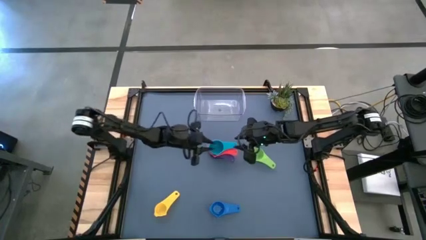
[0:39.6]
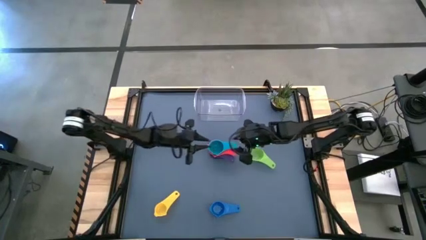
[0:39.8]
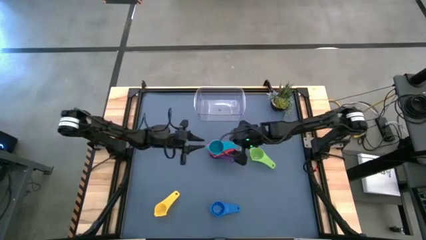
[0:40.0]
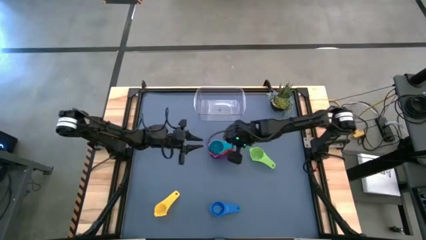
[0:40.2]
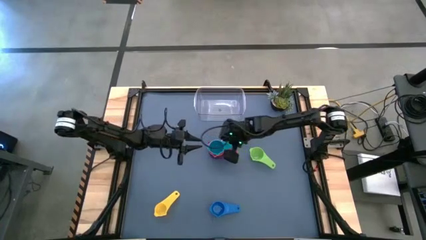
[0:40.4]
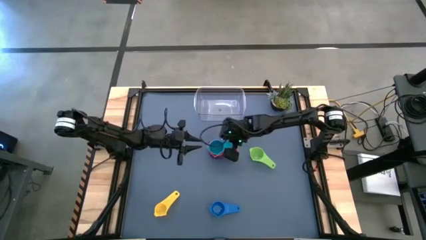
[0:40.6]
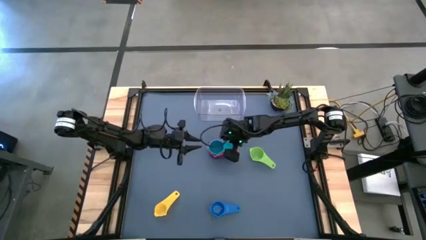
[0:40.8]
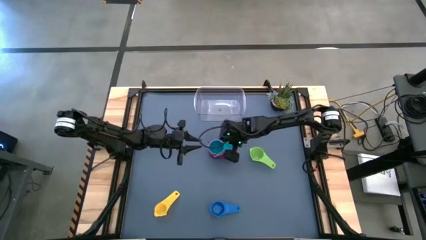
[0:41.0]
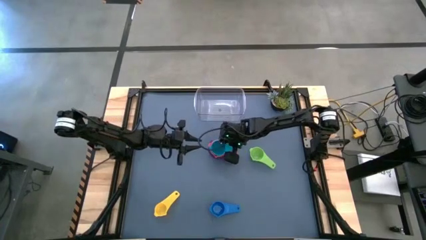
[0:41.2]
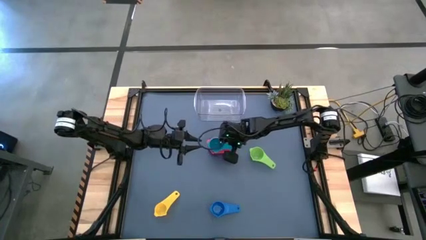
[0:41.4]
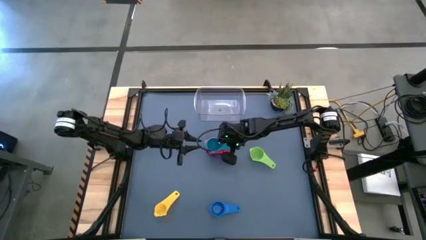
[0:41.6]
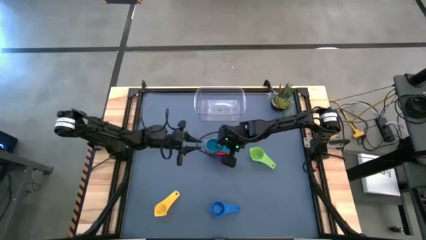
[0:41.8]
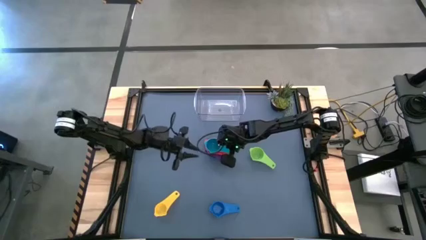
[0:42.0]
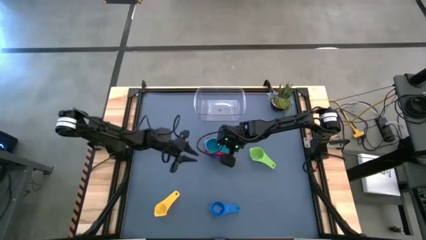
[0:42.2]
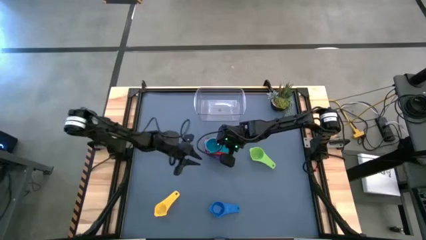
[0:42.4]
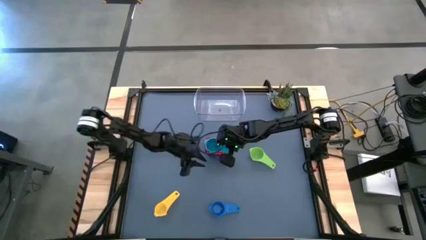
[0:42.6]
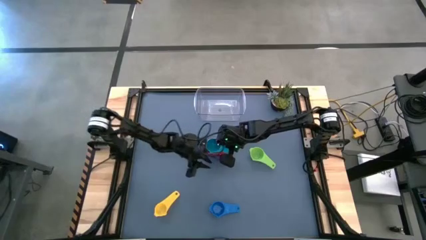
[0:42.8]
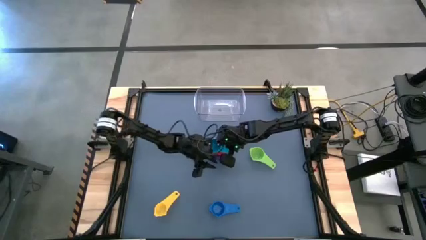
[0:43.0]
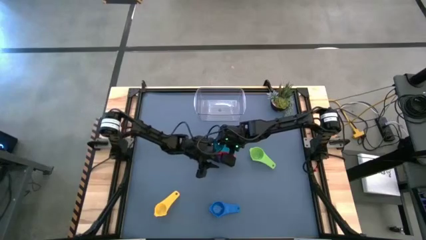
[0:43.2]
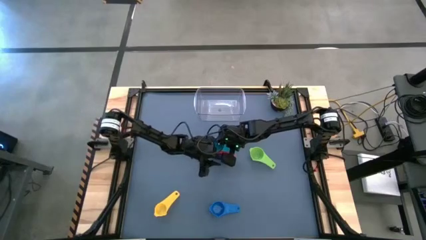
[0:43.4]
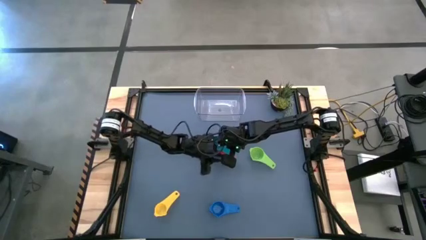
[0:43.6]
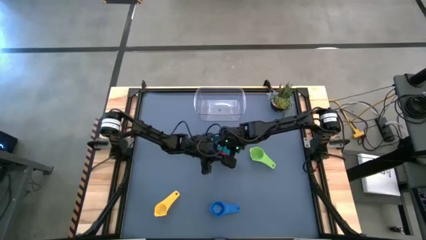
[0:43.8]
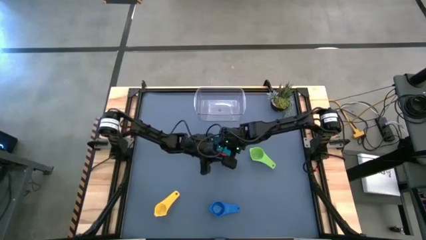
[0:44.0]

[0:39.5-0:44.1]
Task: Nest measuring cups in basket
Adjust the stacked measuring cups

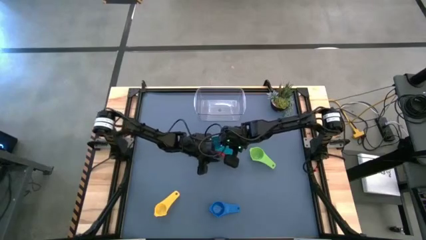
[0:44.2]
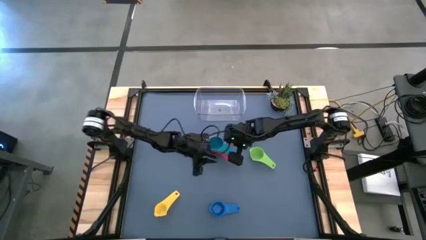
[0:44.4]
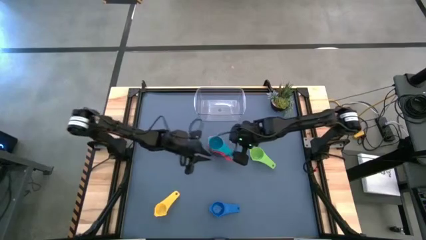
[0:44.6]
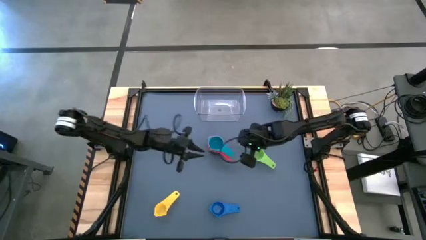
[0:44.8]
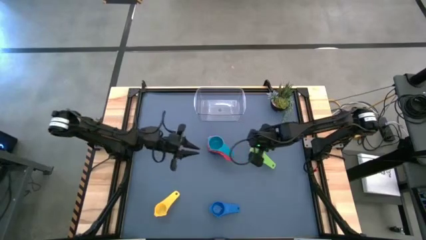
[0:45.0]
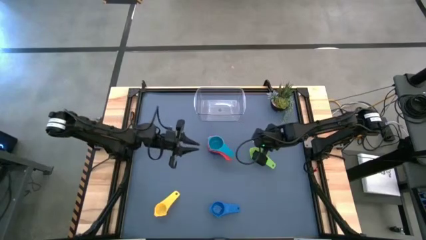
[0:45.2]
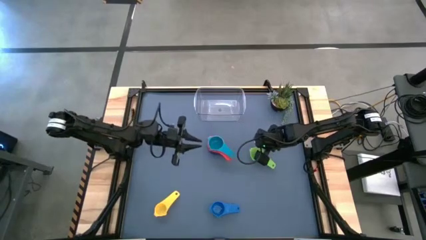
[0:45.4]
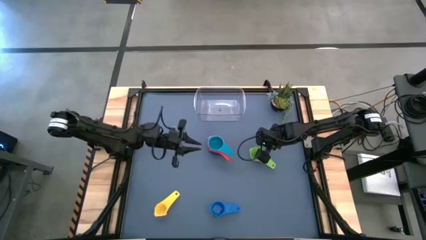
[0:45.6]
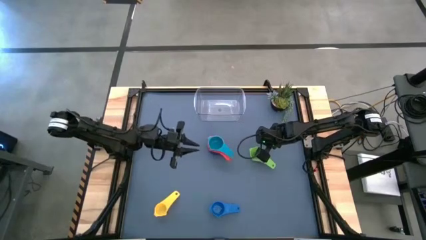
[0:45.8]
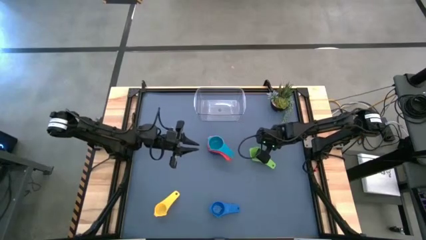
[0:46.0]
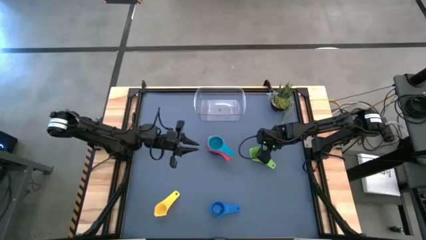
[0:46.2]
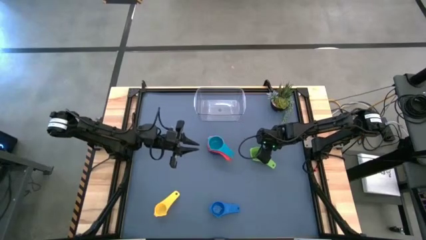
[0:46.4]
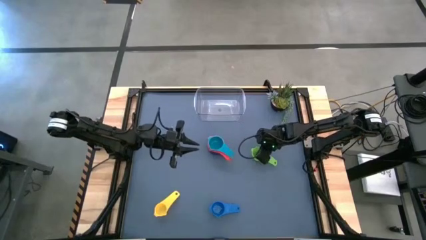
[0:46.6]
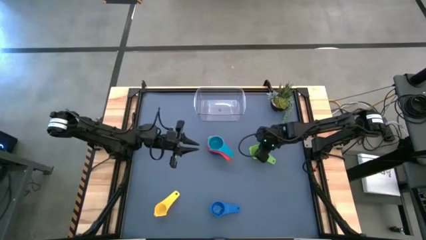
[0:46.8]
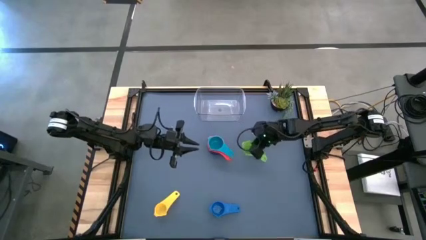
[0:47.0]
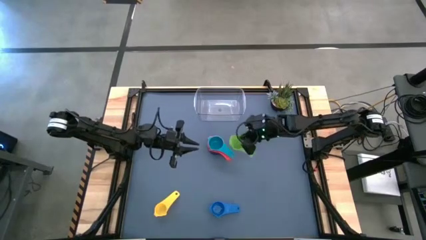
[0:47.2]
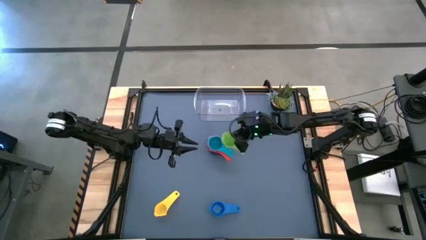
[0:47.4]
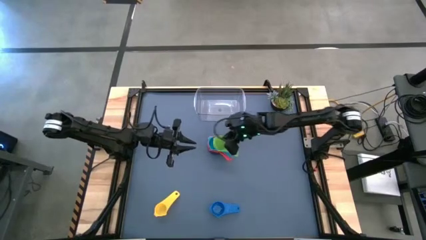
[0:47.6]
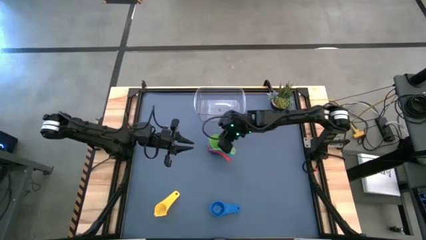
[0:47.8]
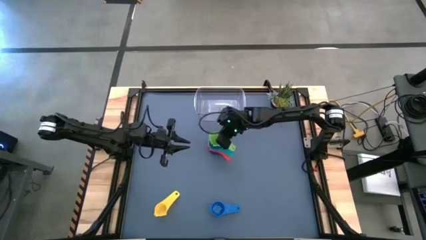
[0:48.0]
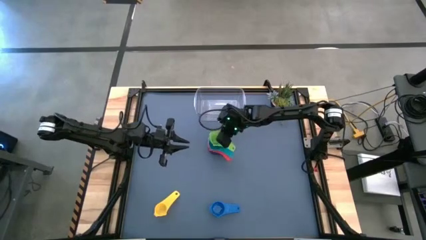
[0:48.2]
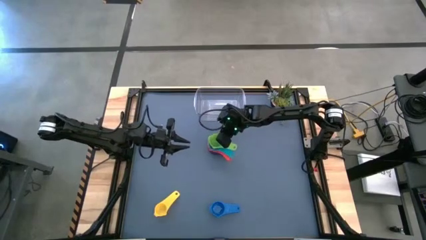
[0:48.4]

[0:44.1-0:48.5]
Stack the green measuring cup on top of the blue measuring cup

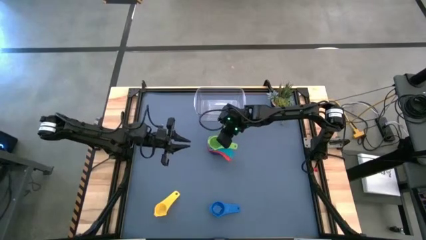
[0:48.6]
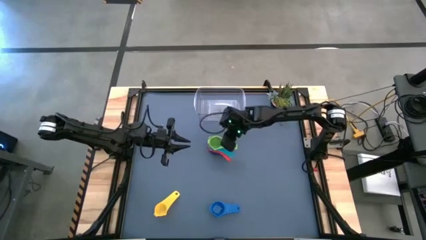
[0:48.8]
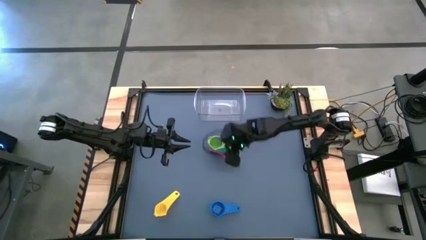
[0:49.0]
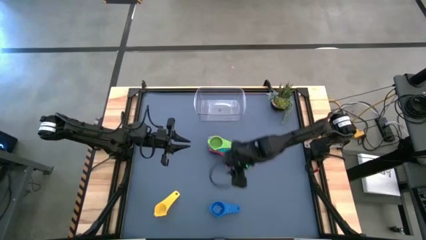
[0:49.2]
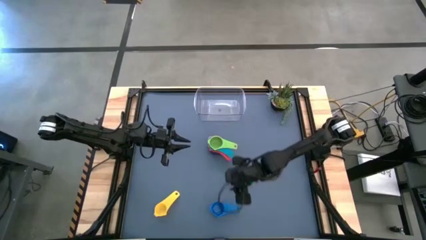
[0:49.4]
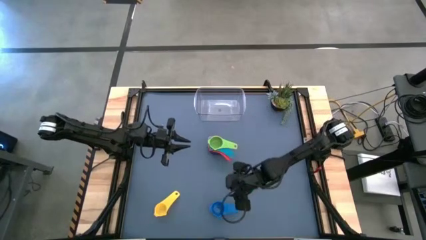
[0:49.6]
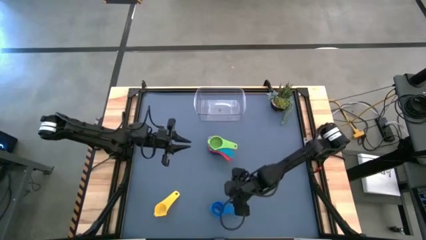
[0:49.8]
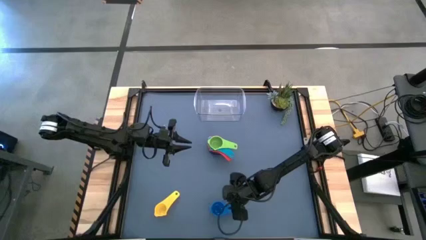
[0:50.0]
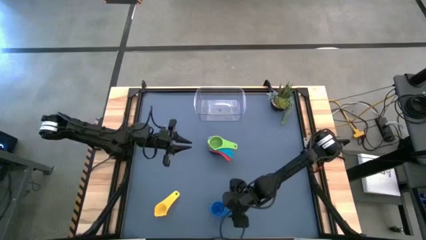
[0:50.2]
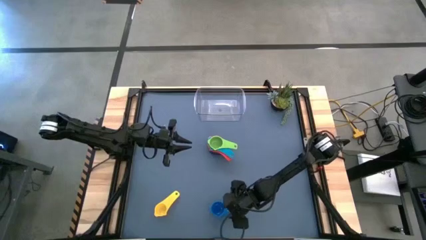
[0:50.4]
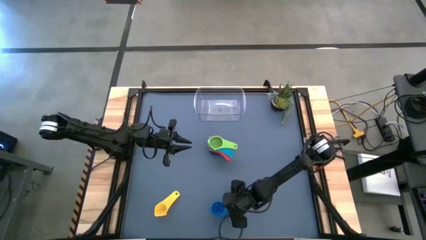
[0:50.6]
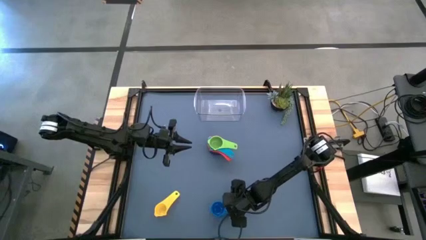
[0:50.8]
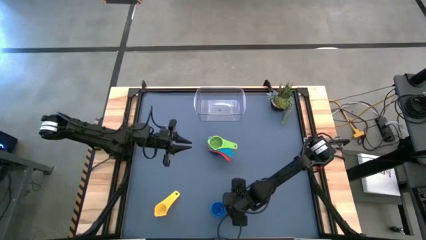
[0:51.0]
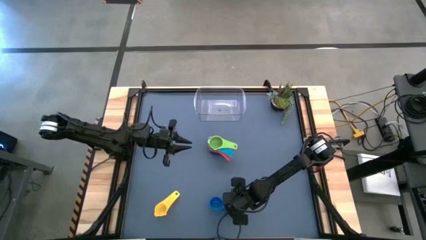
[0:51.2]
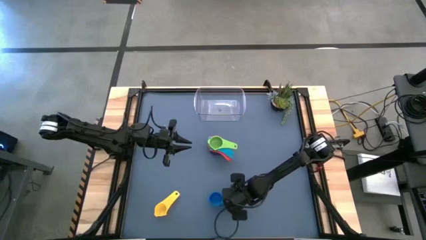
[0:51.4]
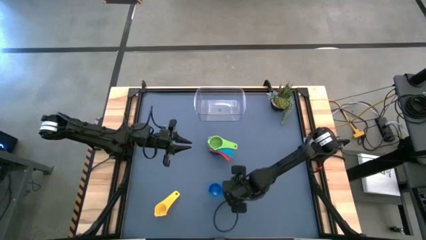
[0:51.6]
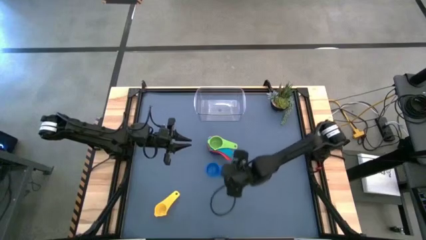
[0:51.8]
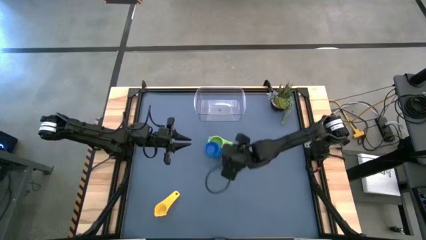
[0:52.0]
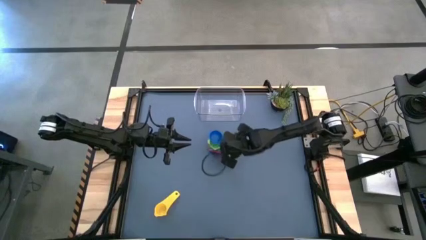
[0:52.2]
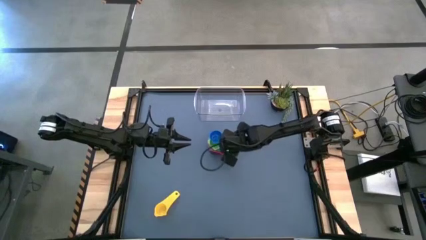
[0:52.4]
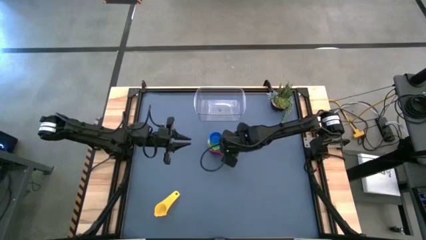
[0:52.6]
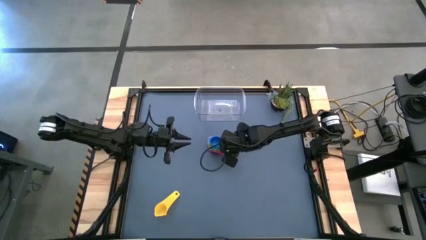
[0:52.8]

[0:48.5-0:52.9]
Stack the dark blue measuring cup on top of the green measuring cup

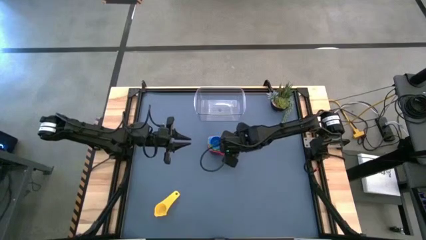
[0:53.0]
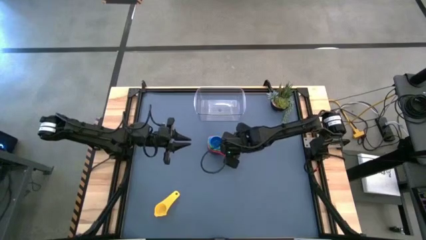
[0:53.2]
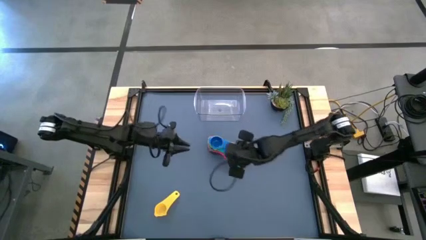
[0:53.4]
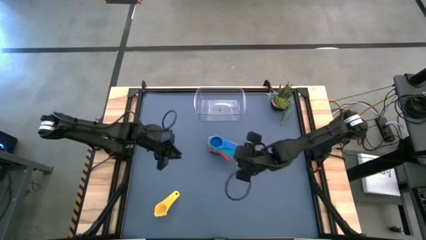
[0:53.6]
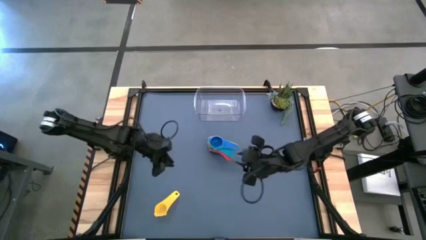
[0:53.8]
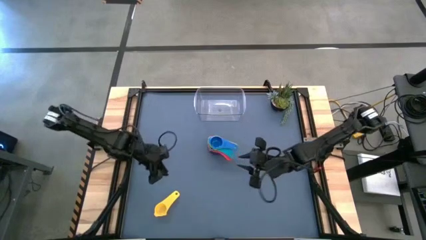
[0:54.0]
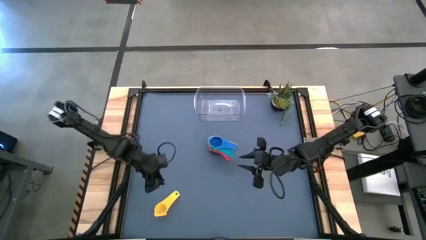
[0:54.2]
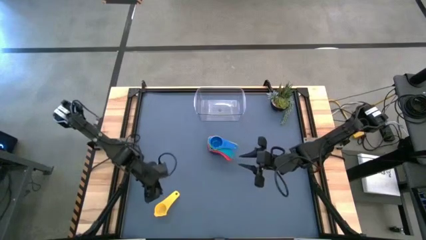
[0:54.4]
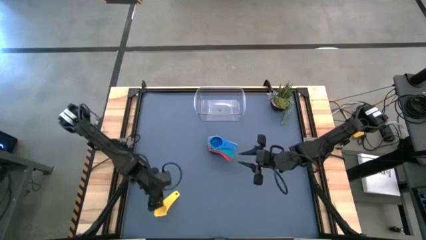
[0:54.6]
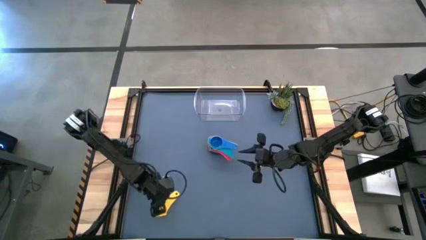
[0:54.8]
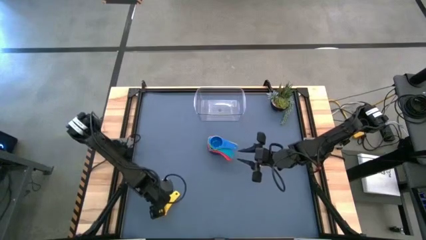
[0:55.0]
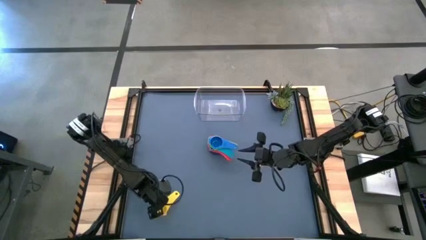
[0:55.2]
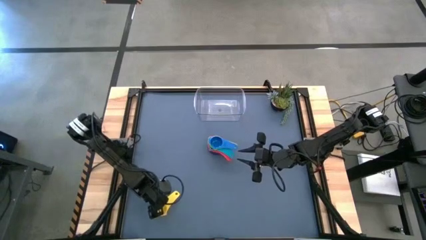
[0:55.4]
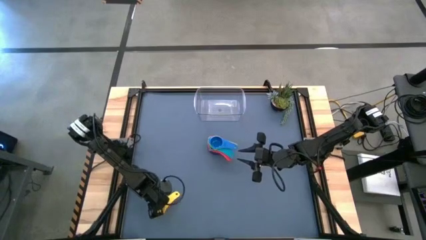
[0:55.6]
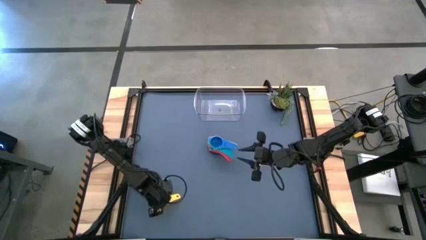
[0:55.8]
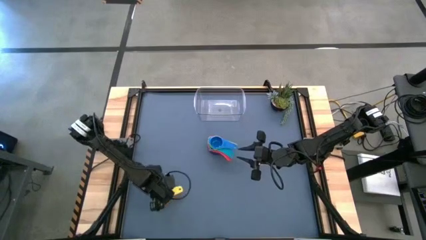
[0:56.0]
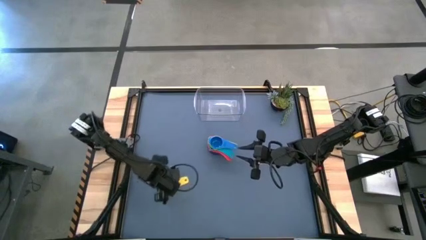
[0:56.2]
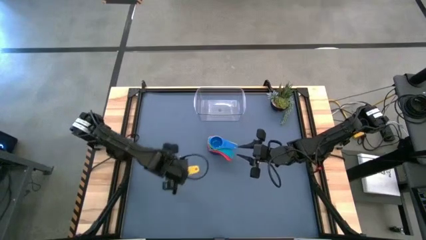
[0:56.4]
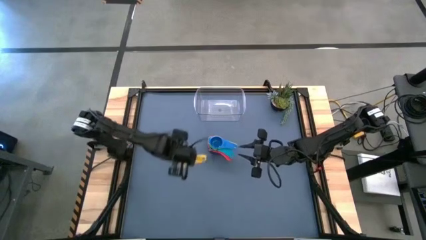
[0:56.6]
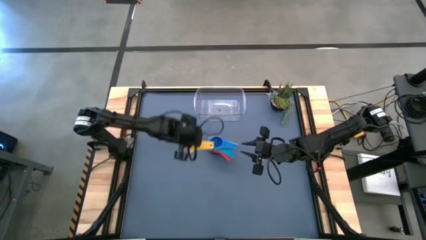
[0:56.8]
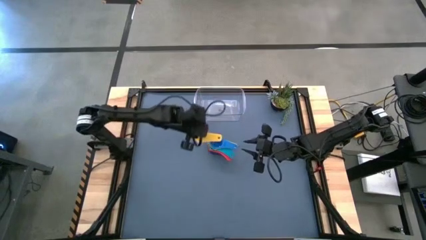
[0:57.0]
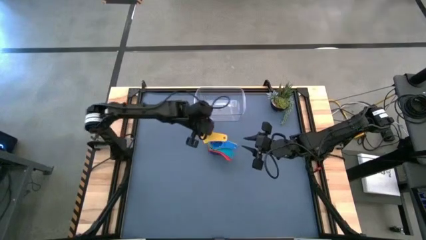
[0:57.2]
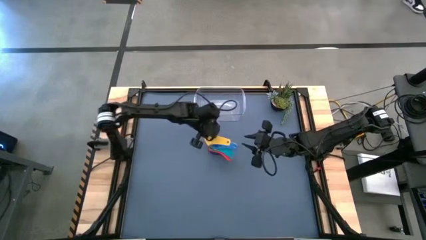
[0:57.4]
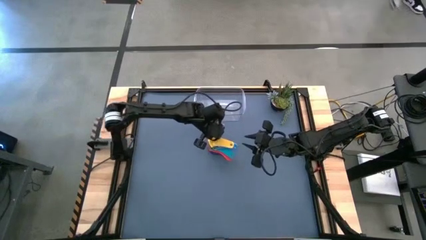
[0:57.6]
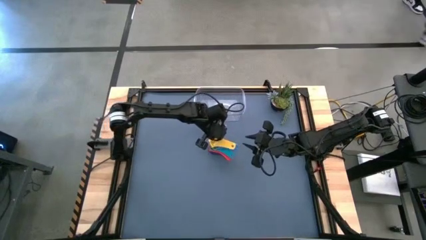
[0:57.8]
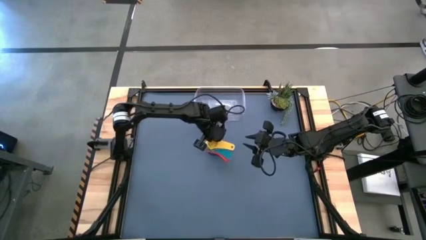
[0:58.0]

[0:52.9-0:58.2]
Stack the yellow measuring cup on top of the blue measuring cup
